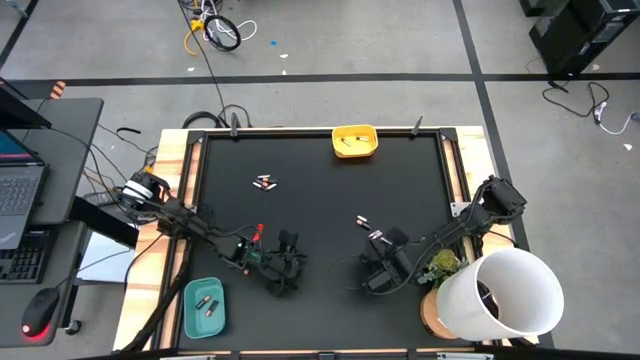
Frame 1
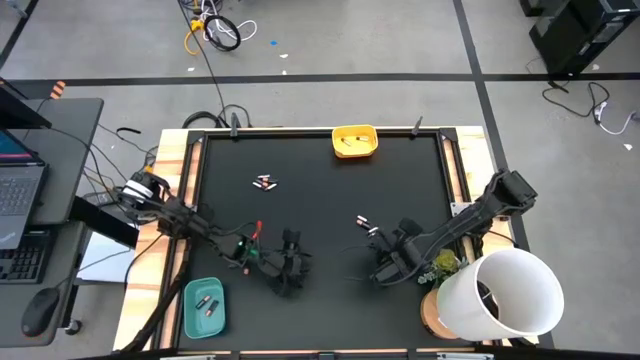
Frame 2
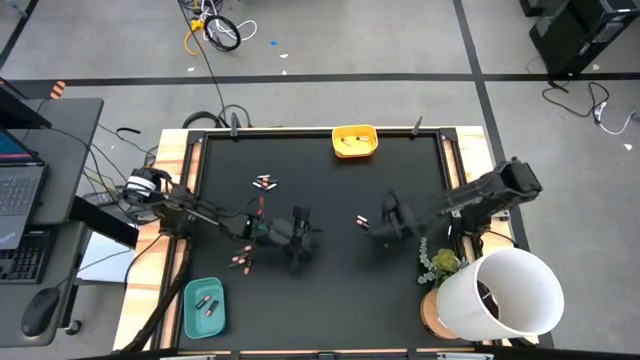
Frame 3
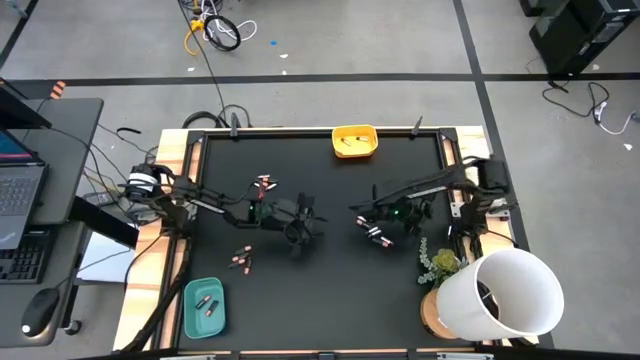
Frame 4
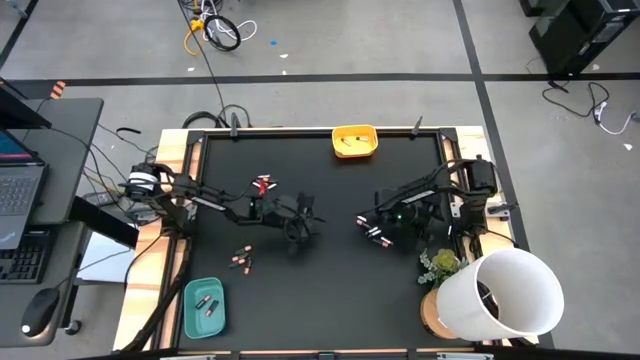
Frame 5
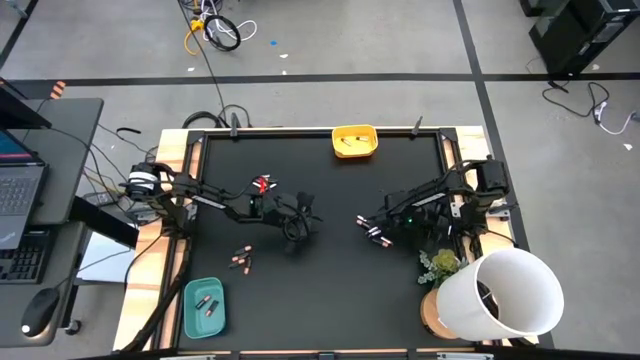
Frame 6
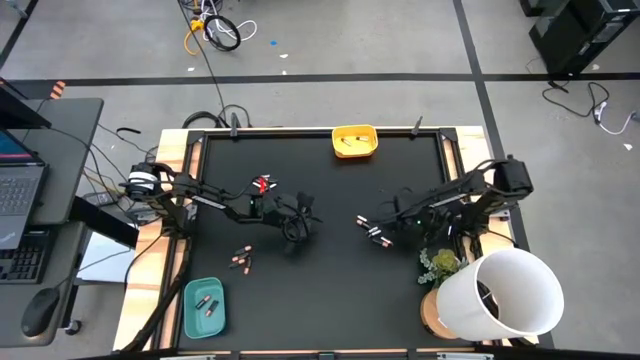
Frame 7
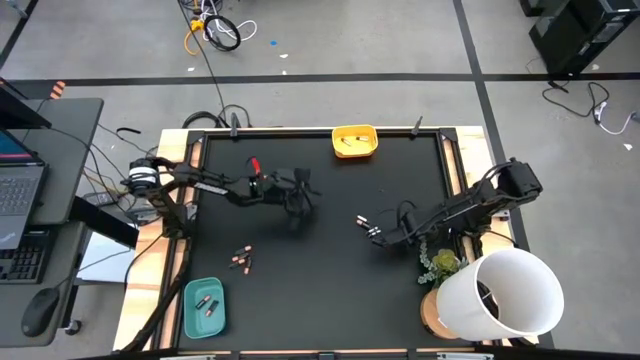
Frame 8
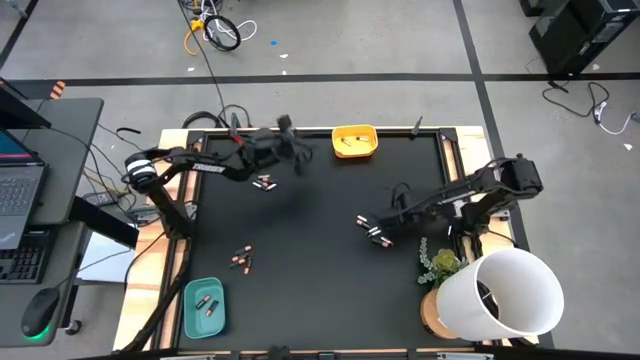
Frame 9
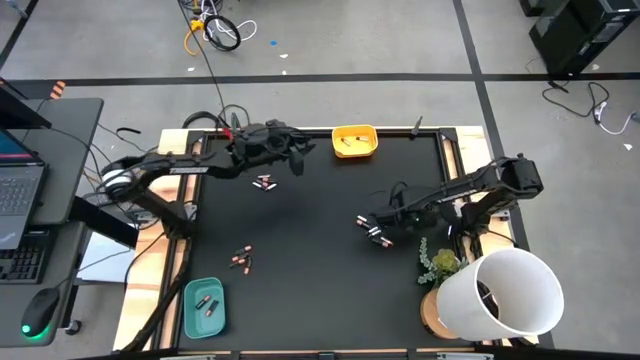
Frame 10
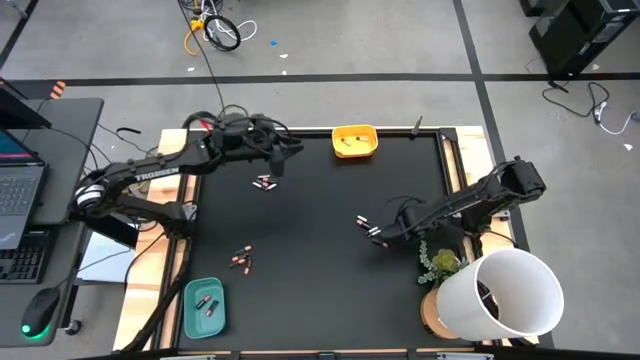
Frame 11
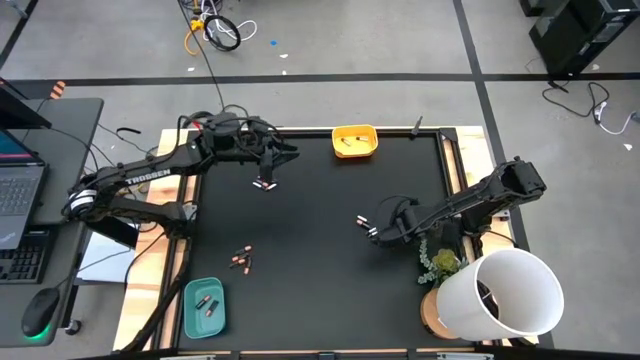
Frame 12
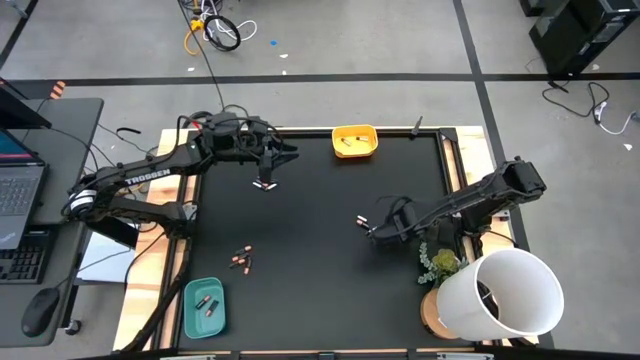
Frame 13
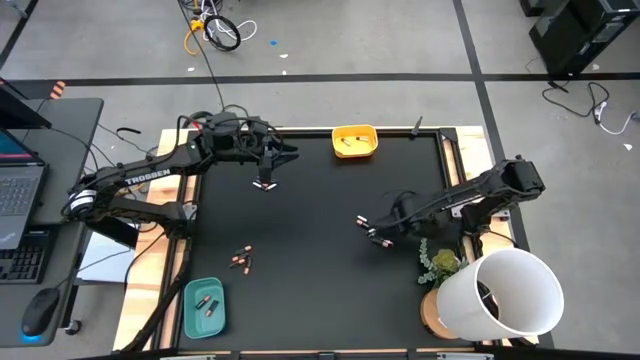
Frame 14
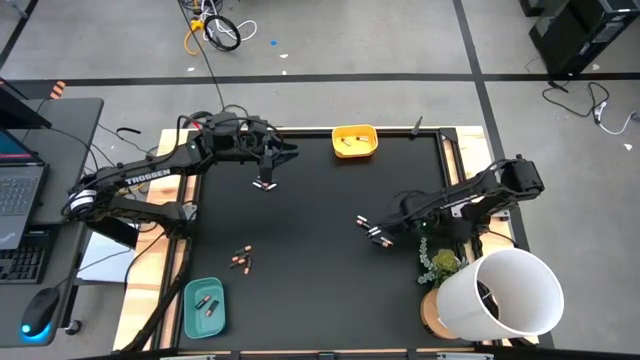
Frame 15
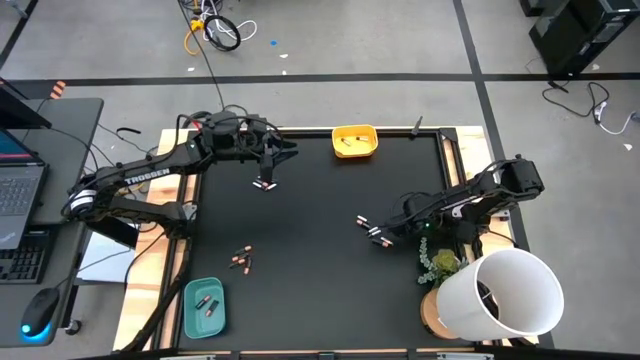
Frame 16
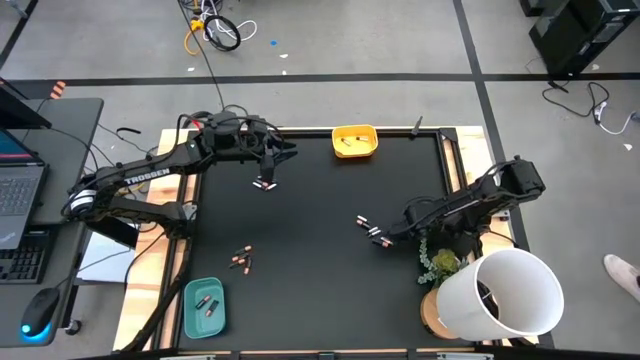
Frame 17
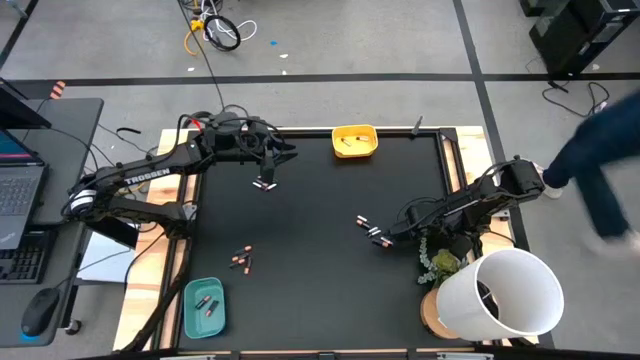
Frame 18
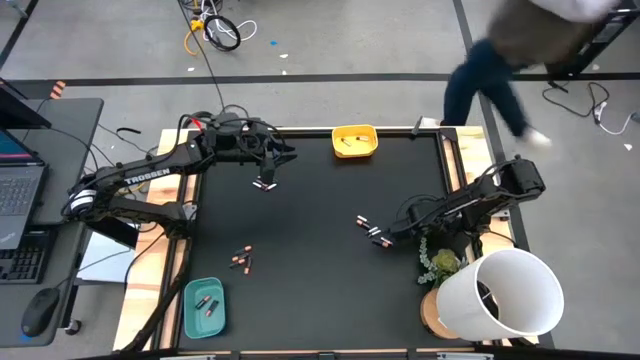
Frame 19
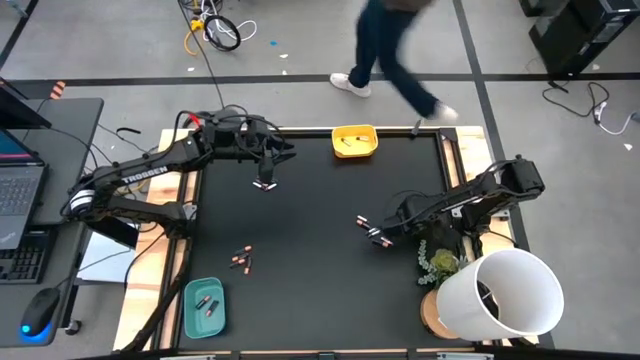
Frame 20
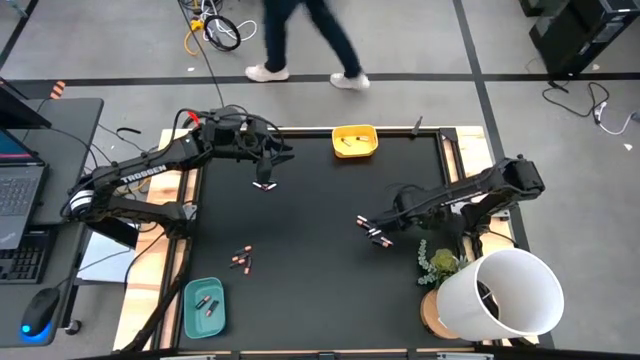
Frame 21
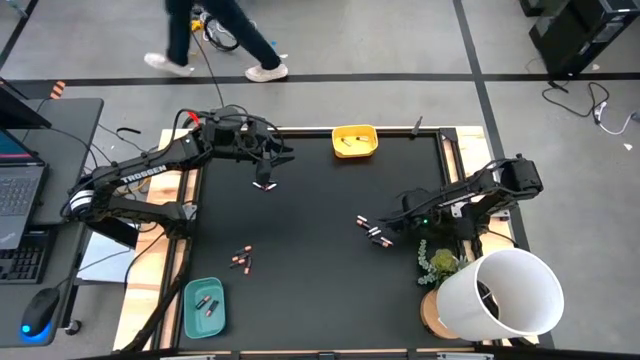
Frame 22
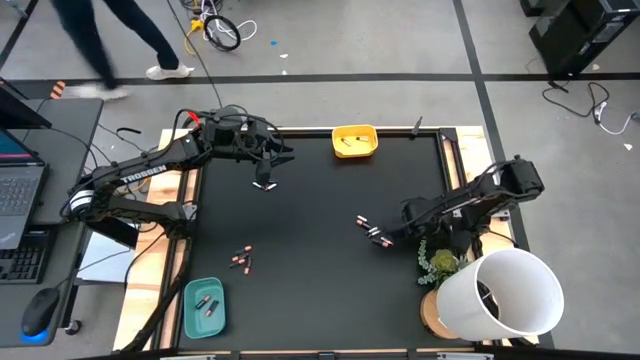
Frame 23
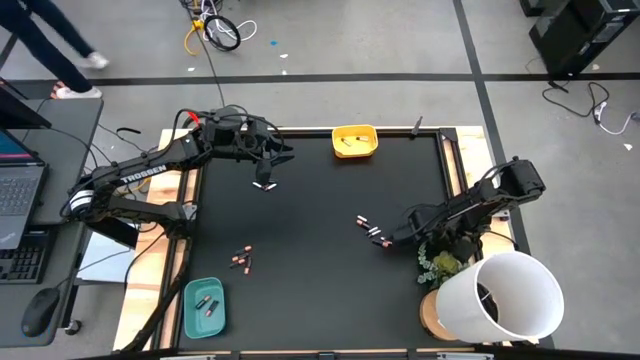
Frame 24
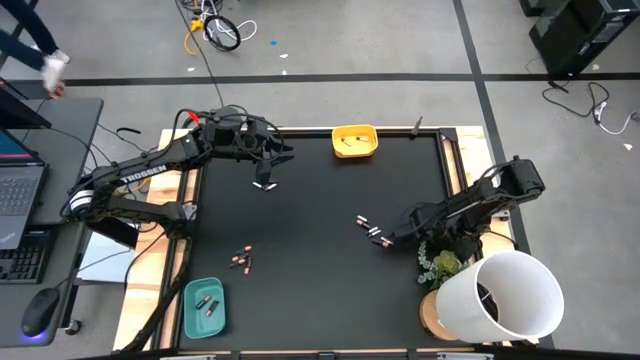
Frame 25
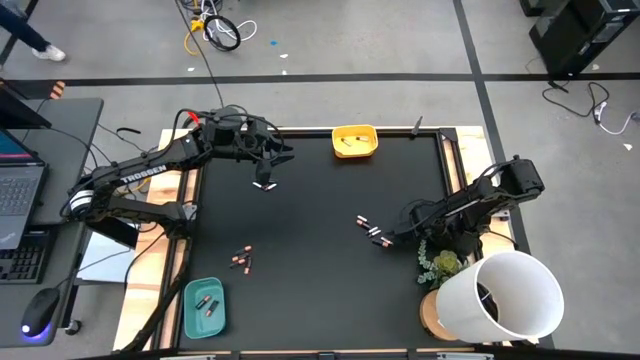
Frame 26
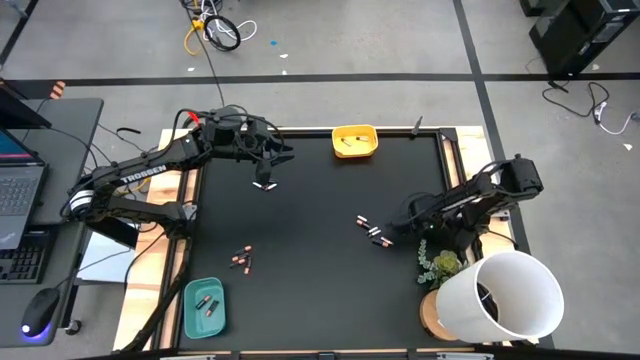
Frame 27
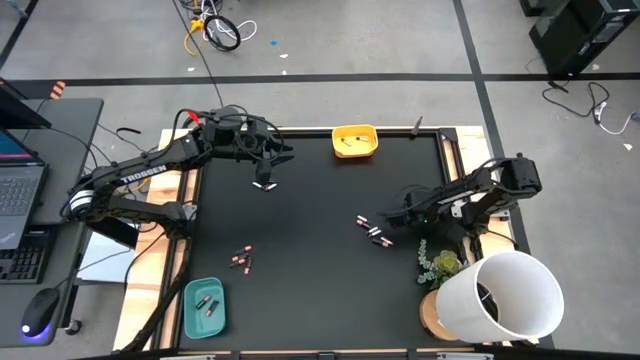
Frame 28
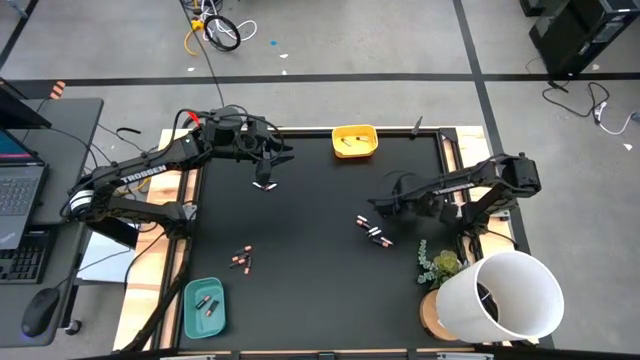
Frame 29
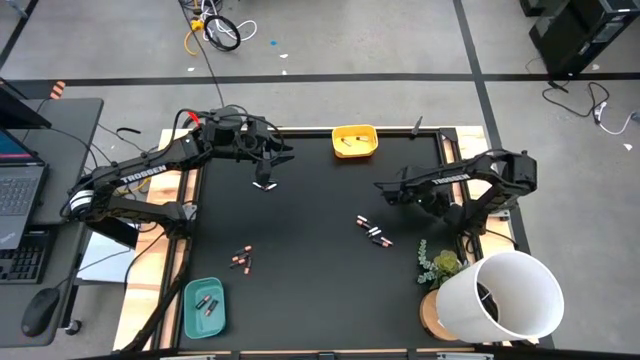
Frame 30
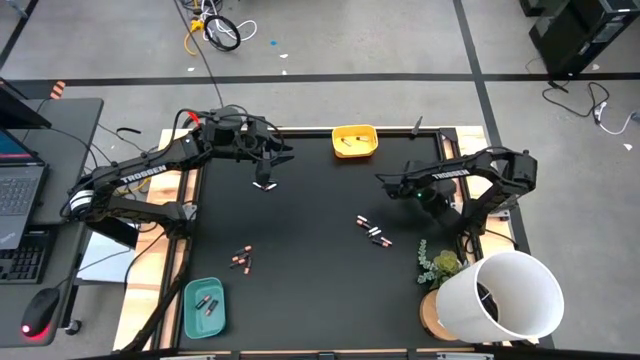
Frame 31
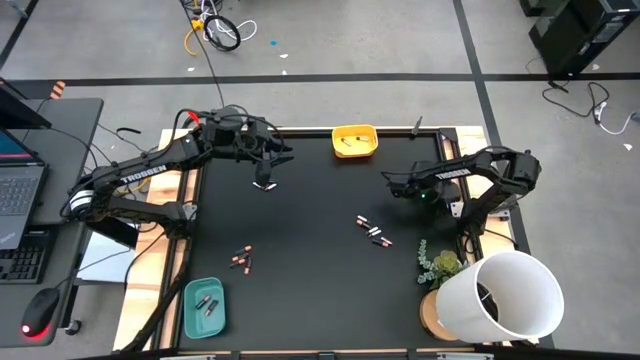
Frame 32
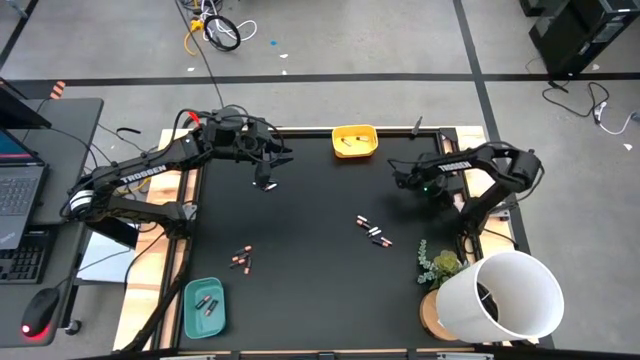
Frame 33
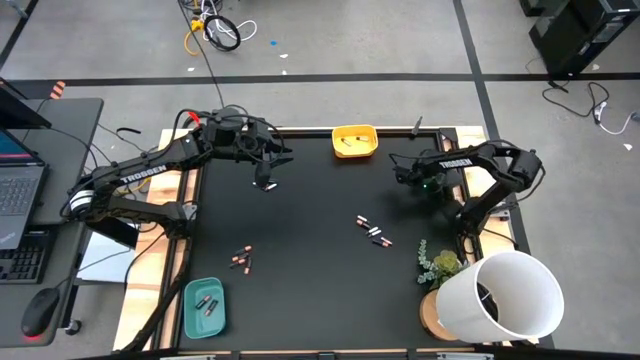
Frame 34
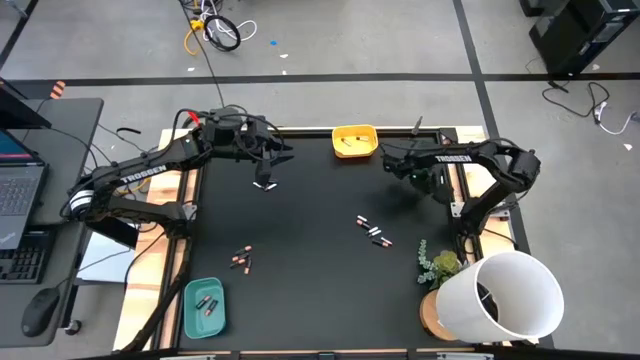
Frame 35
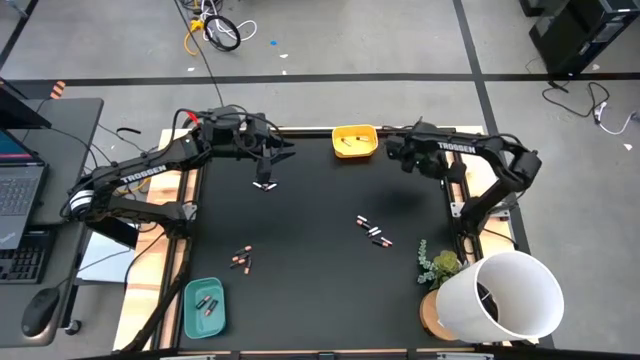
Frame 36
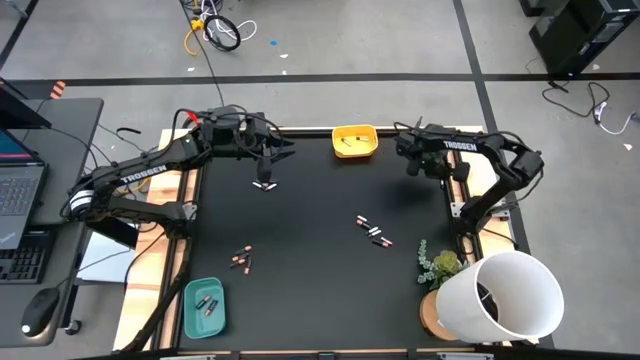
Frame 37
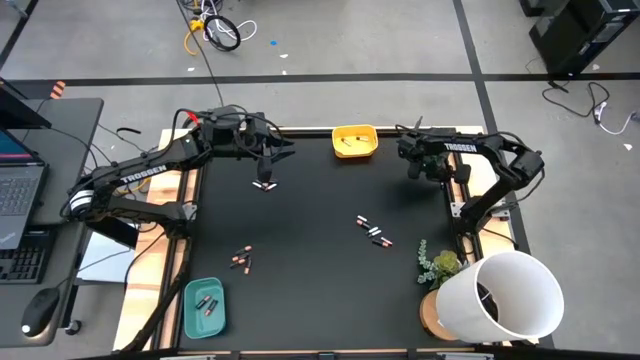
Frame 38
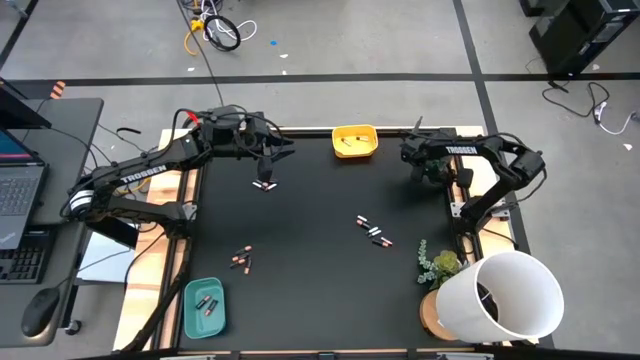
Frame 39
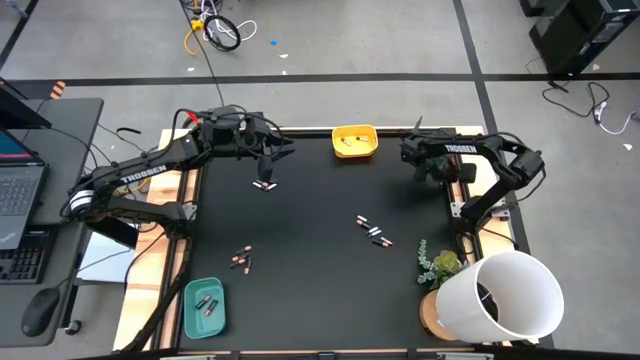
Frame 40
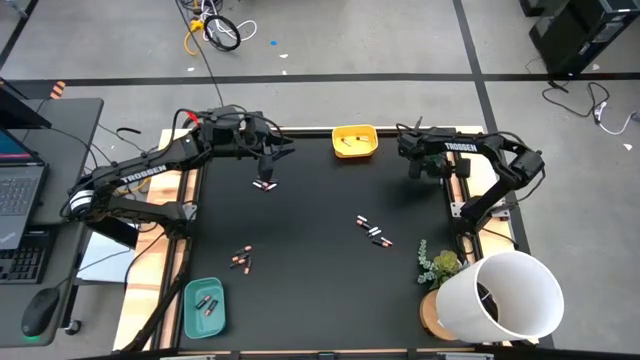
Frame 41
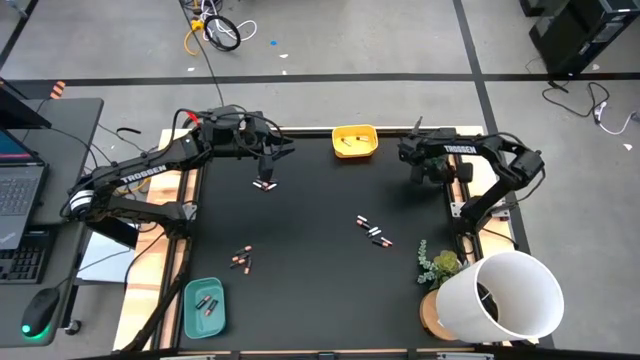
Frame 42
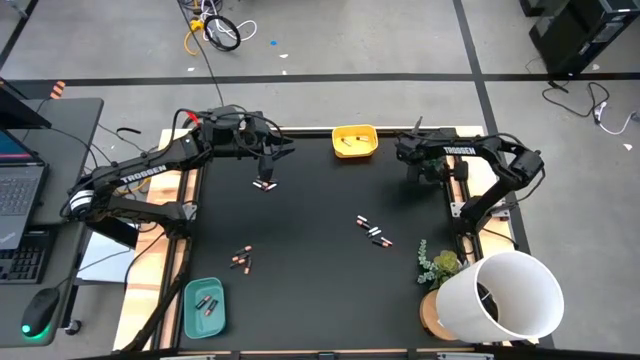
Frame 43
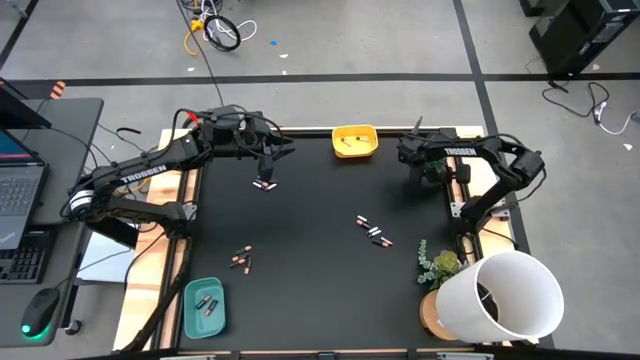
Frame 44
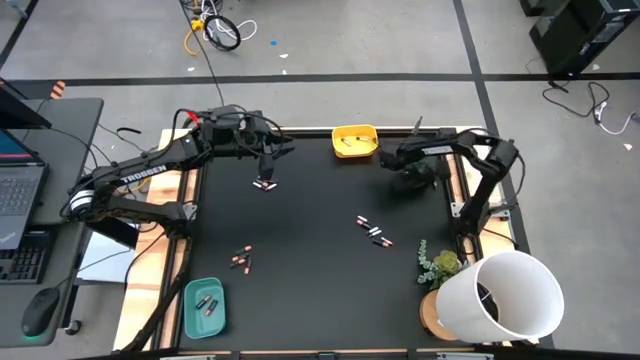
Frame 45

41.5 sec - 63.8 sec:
Task: Sort batteries
Put the silver battery into the yellow bin
